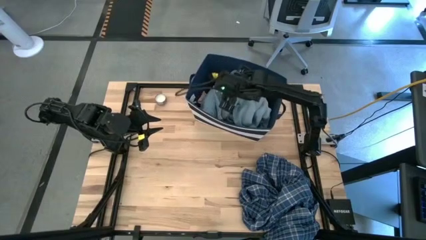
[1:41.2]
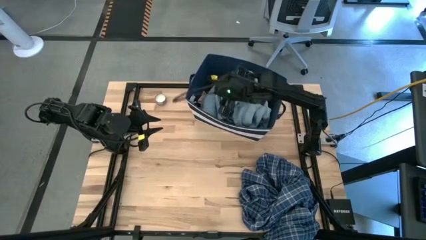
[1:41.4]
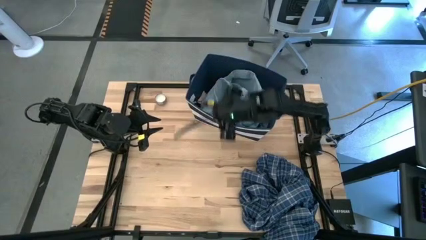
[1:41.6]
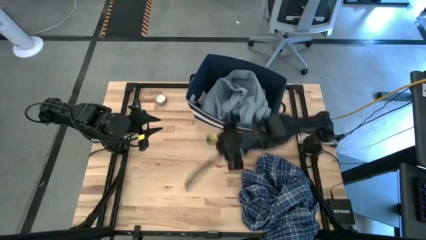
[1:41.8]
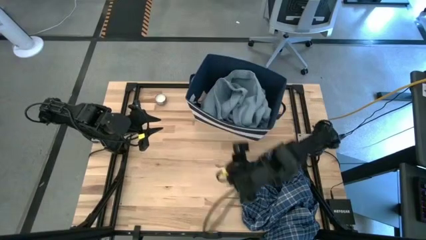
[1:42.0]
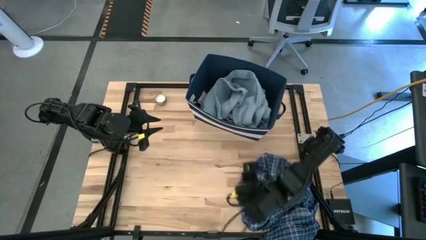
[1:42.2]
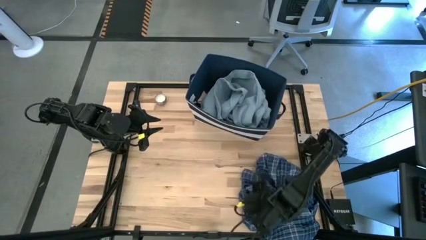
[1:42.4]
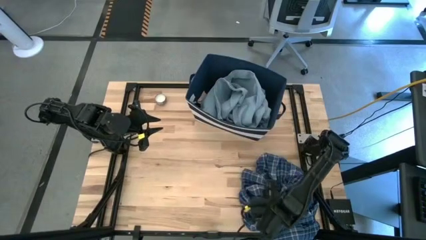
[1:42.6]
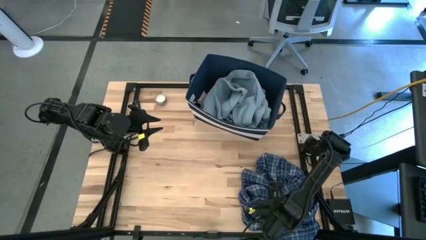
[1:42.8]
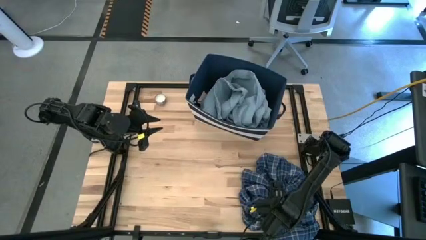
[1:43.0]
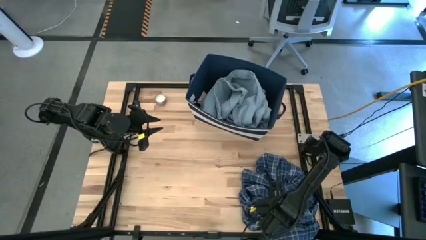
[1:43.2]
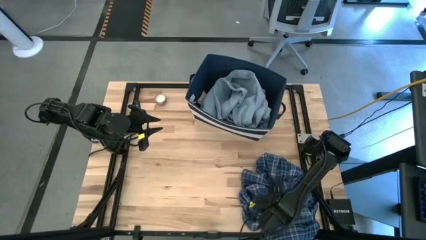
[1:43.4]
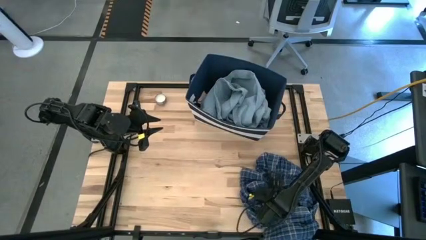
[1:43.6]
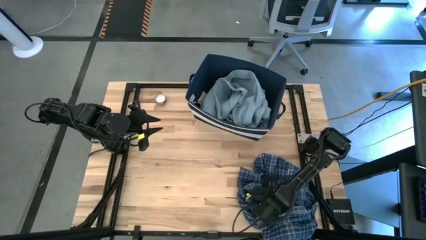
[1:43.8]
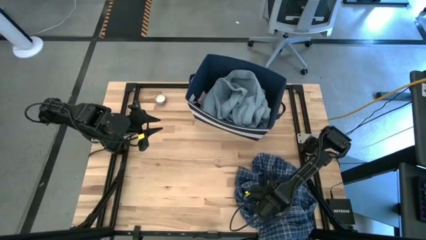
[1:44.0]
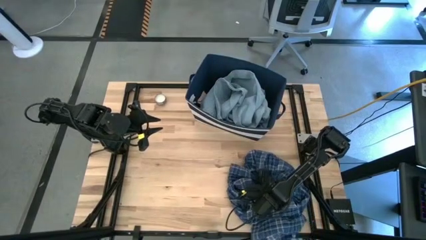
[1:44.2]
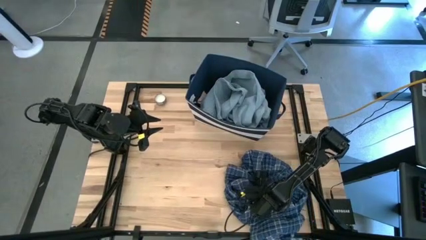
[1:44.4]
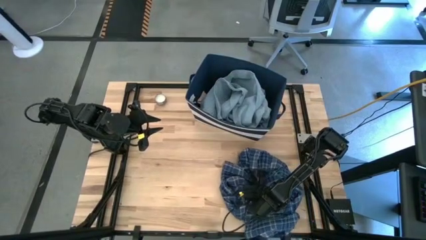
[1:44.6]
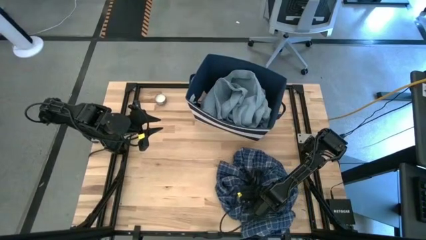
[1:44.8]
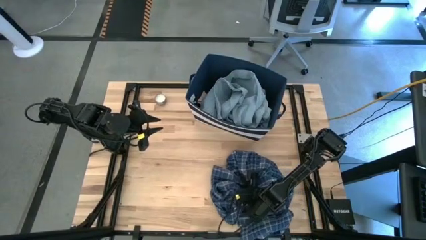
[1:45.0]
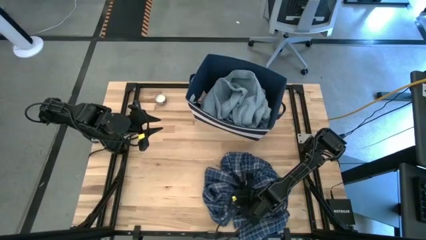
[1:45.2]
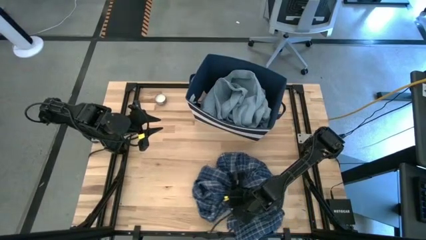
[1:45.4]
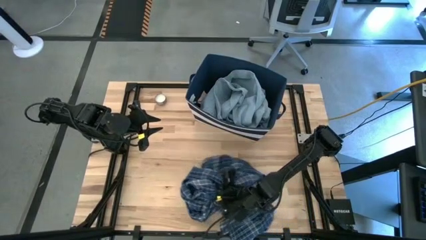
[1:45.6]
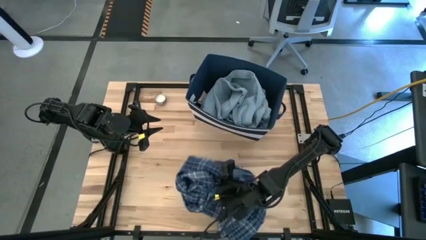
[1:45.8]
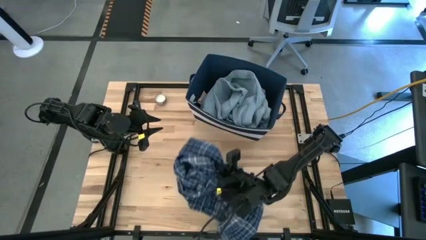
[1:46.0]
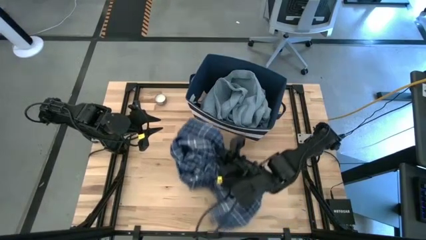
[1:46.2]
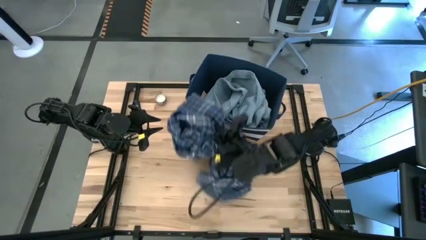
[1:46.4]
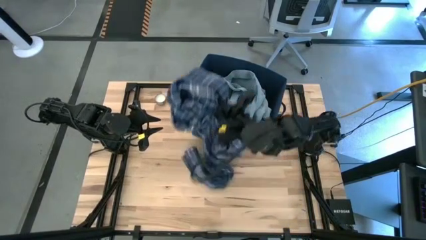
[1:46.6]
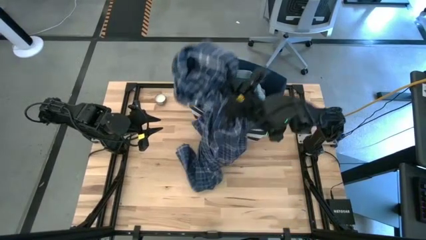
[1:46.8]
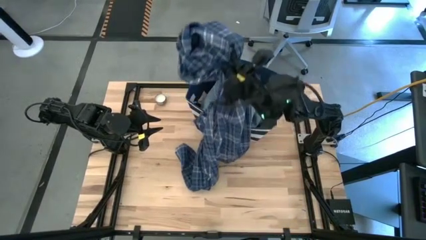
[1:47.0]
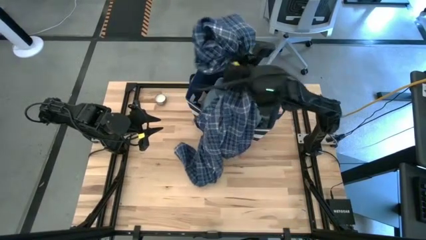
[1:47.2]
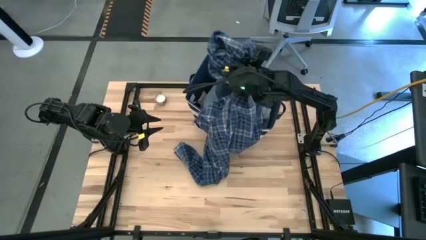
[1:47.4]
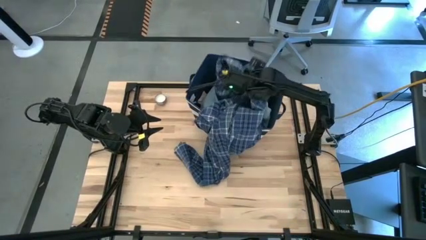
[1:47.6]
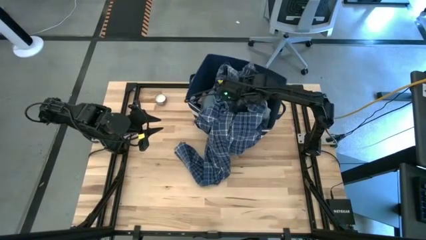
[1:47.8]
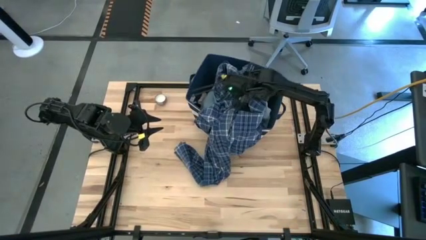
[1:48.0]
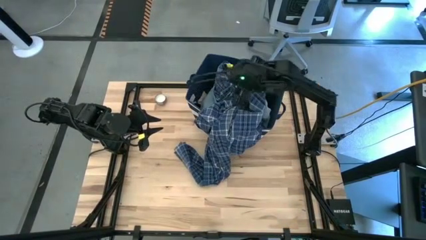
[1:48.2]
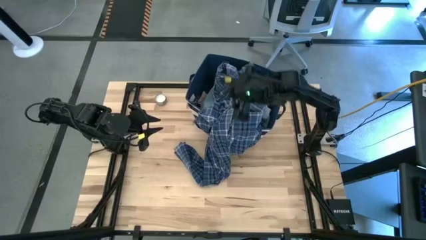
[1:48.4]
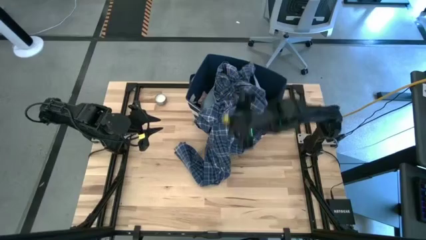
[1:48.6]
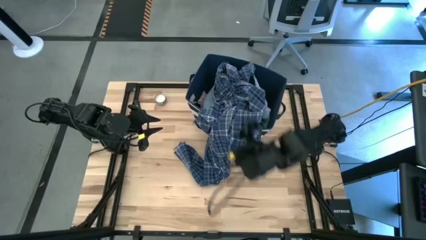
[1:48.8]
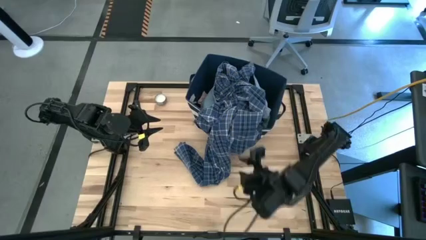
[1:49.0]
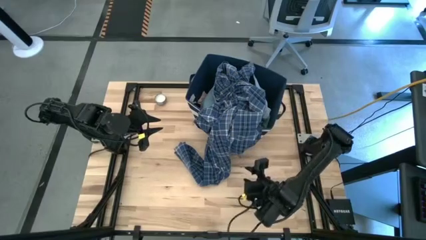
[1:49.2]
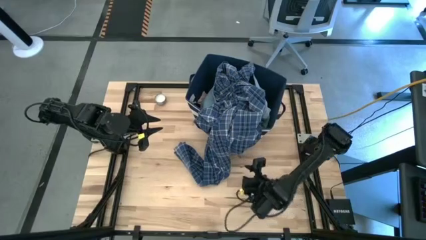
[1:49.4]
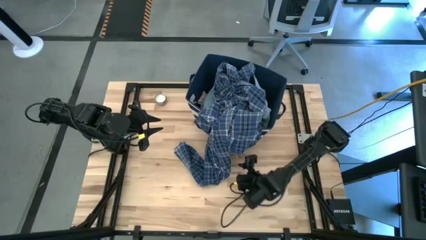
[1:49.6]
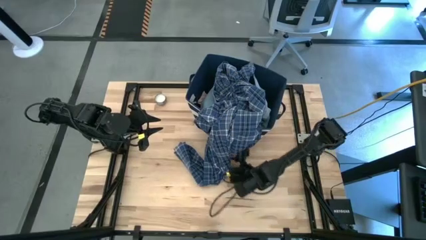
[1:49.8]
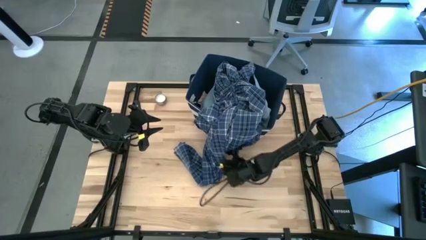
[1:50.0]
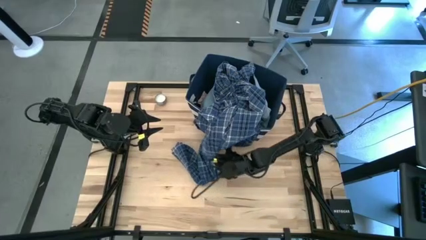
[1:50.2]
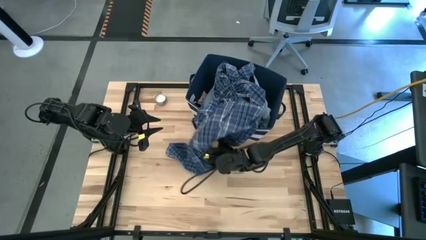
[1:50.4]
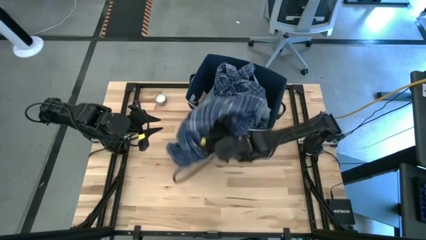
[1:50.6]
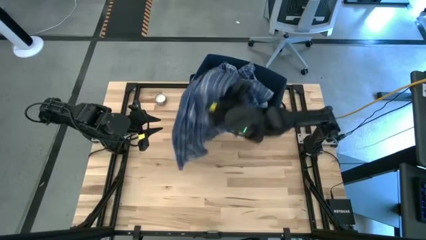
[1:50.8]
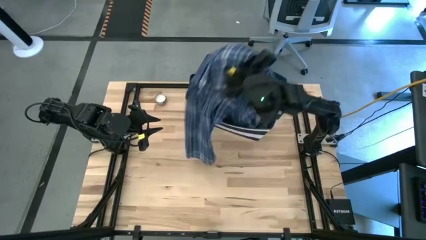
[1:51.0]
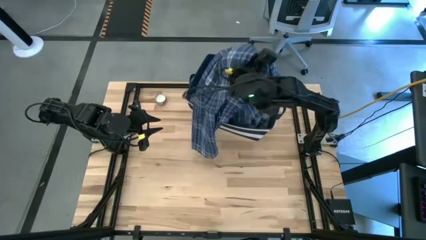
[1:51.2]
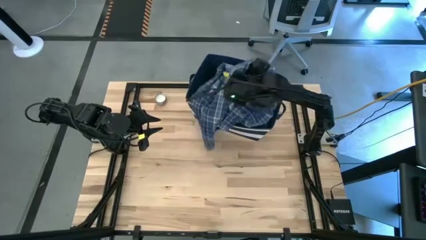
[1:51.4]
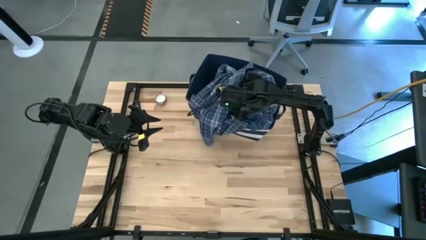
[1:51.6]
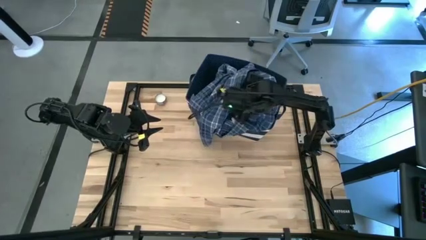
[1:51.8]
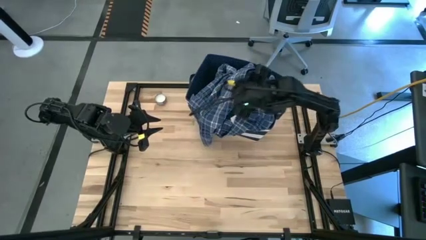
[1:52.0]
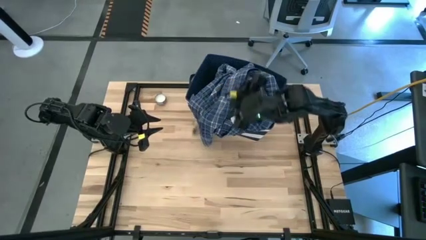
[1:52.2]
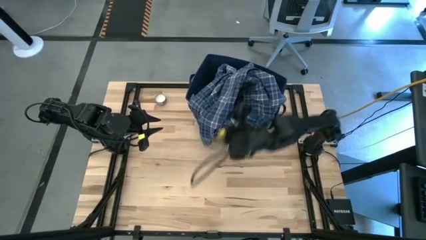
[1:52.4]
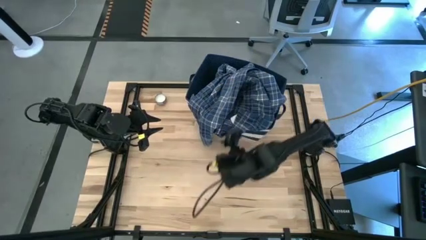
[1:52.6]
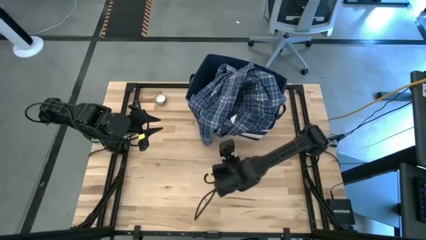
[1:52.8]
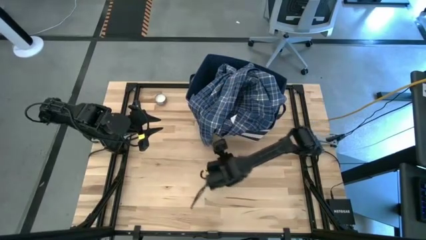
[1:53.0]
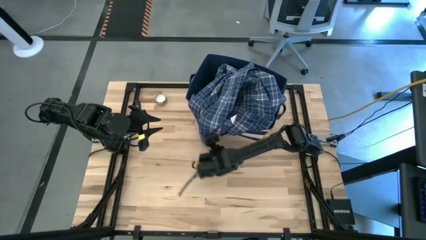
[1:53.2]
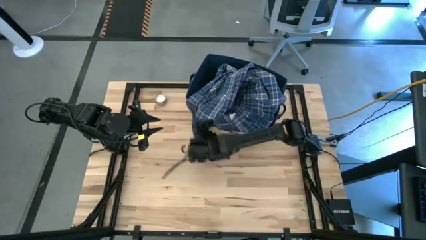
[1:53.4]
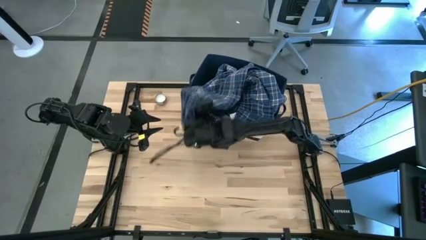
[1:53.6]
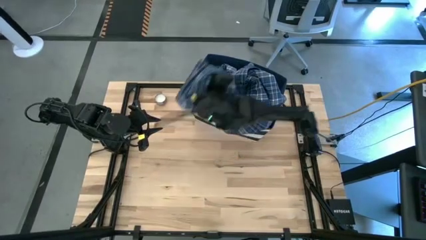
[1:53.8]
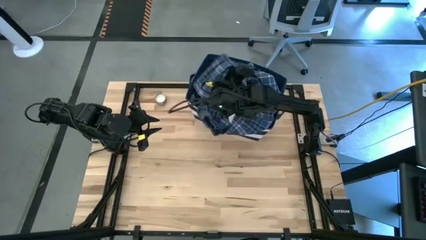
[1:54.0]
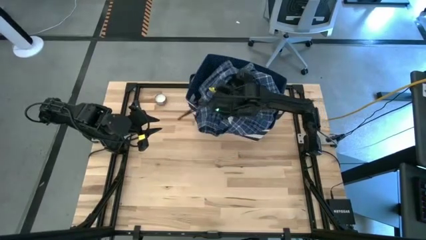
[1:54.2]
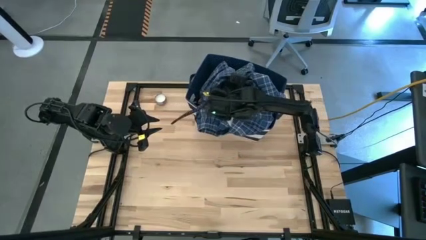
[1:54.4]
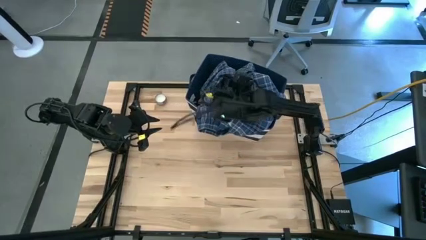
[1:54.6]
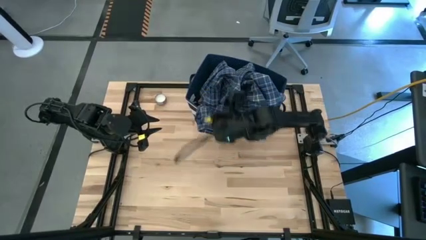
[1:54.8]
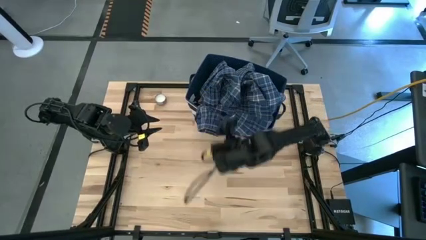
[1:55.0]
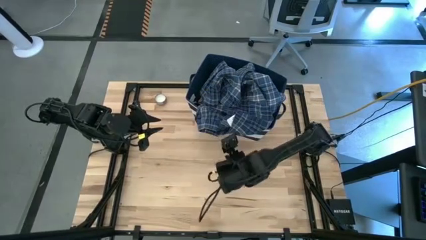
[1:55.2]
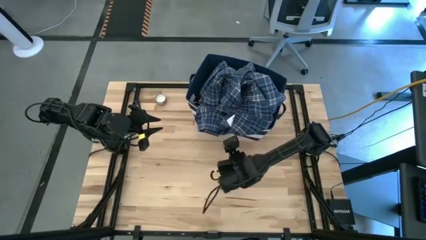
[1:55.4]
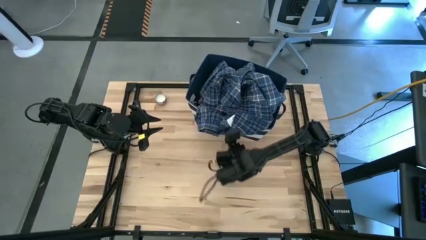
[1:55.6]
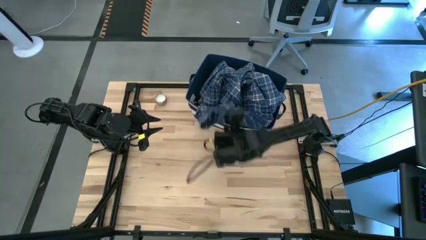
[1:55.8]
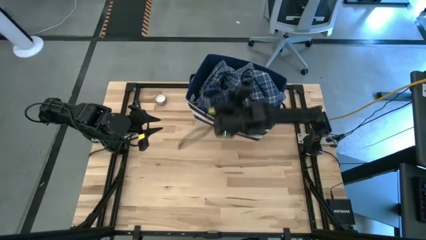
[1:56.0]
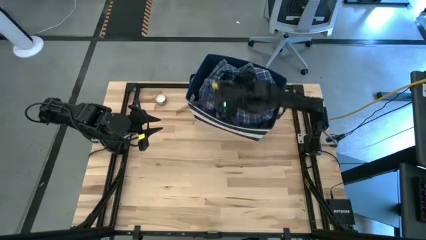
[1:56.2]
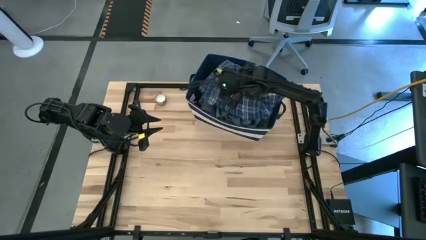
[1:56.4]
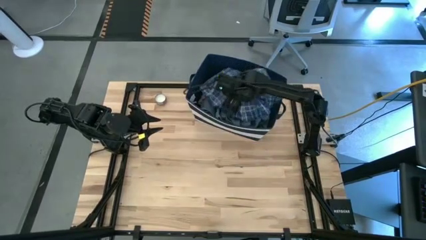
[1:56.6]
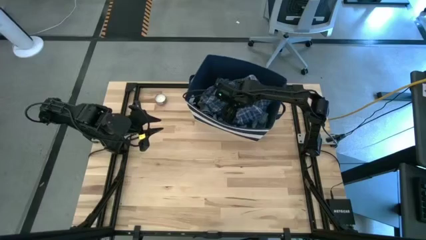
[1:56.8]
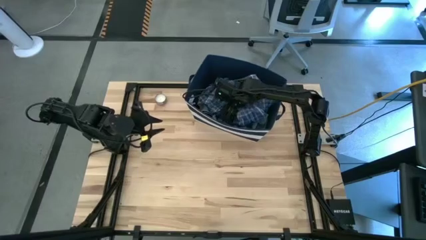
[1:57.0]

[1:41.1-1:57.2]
Task: Sort clothes
Put the blue and white pants into the blue laundry organizer
